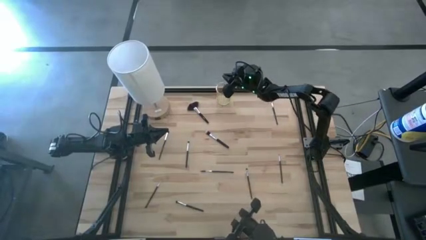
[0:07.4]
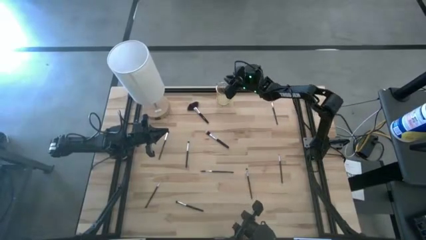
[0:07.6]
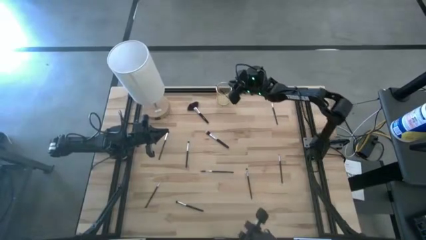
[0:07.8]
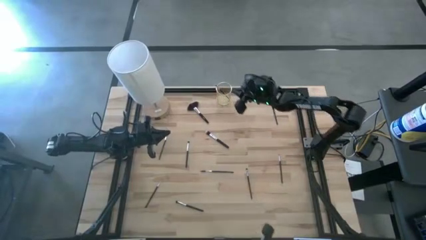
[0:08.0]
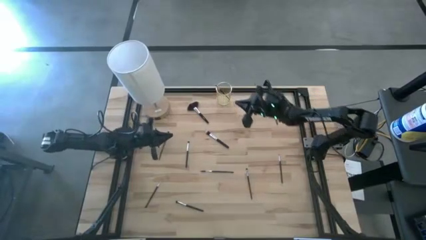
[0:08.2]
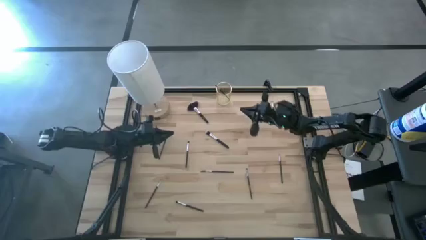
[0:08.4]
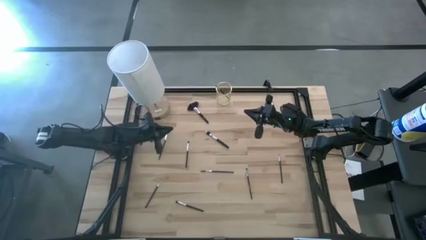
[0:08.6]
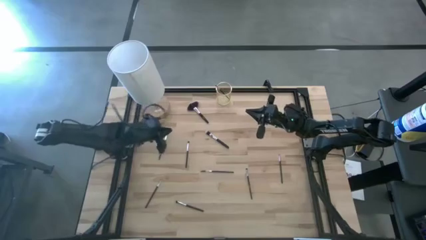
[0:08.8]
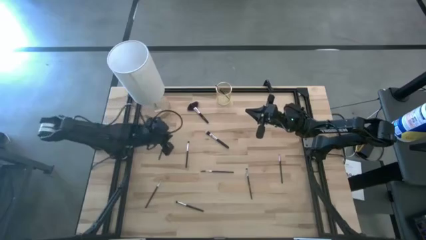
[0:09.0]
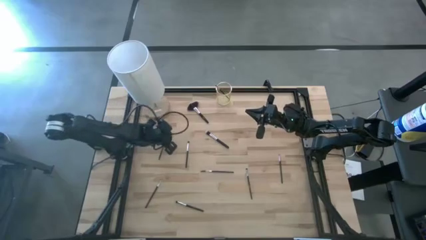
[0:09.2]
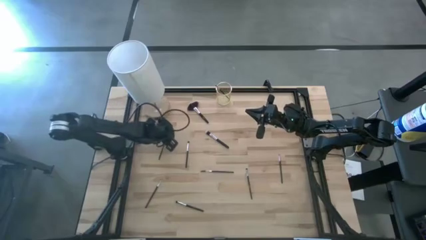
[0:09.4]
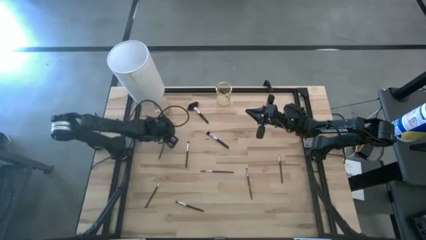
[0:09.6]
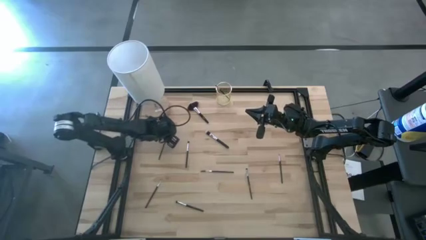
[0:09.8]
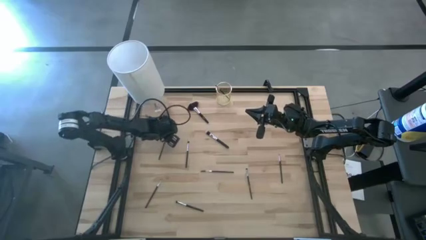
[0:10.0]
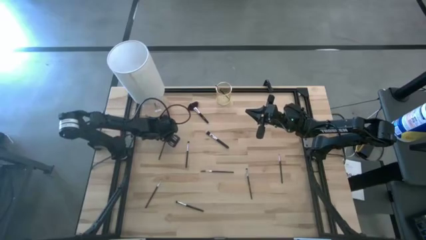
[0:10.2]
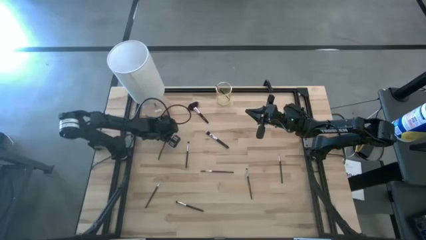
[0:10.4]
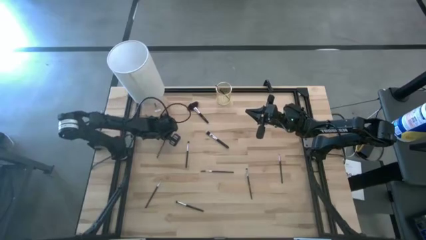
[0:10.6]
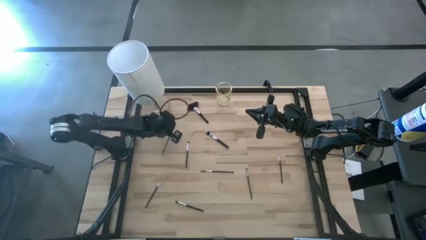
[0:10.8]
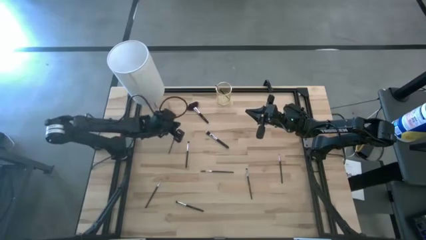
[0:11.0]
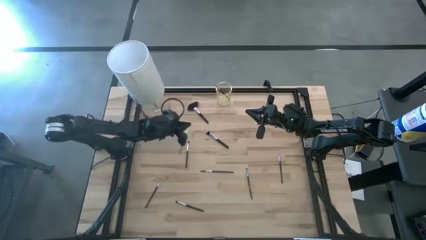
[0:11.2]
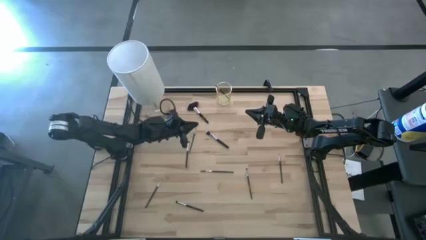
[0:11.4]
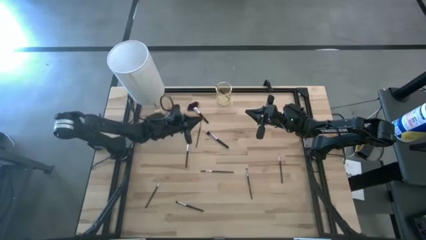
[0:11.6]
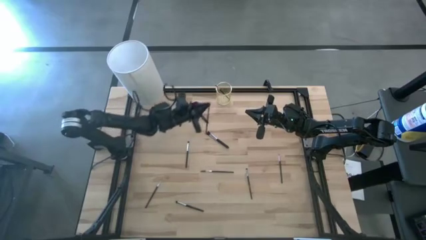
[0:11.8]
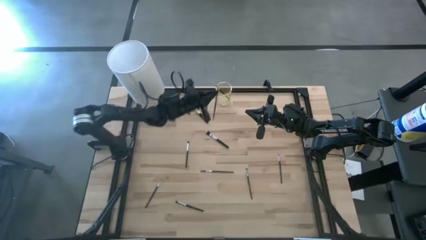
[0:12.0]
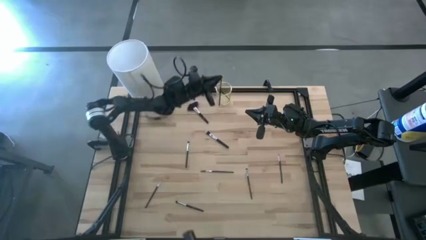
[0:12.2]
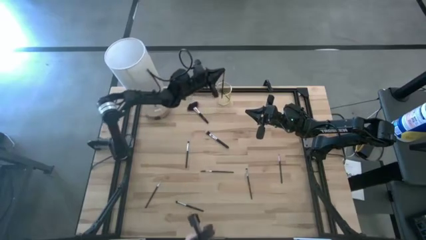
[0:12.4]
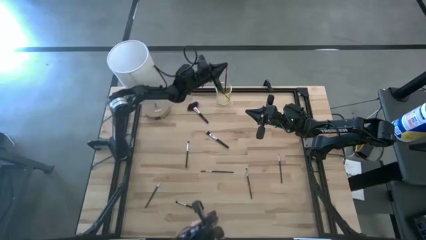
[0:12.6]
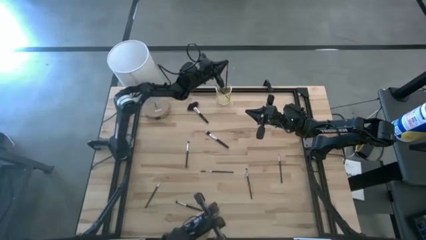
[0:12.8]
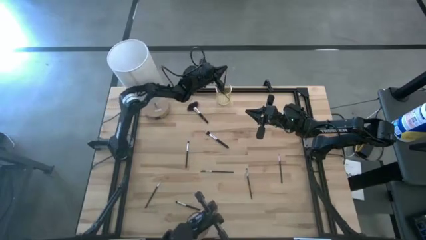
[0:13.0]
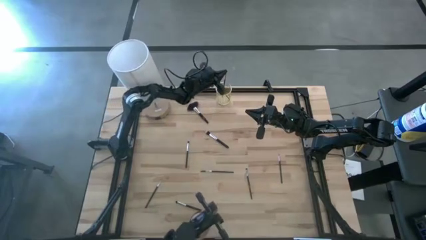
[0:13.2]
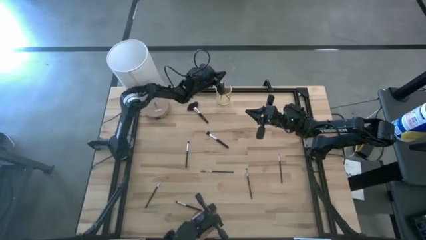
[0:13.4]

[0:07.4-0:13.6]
Task: Put items in baskets/containers
Put the eyeshadow brush into the gold container

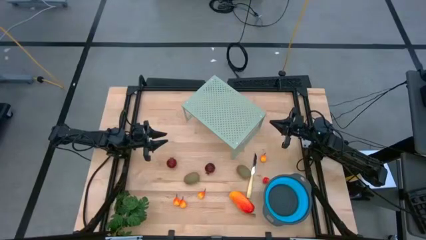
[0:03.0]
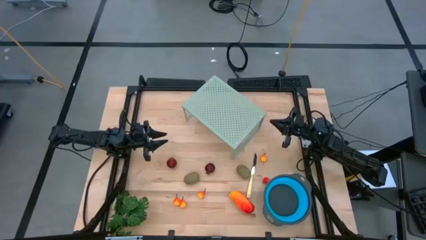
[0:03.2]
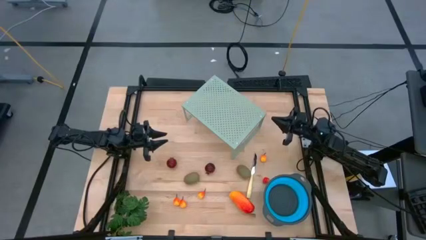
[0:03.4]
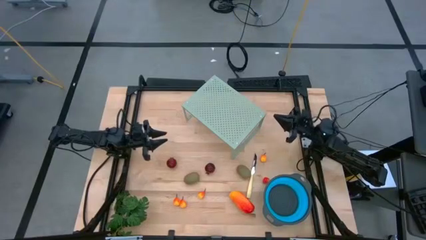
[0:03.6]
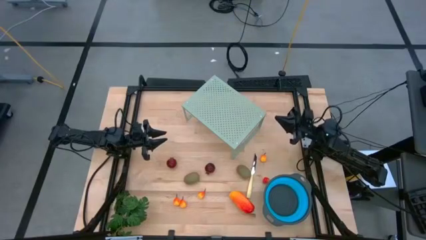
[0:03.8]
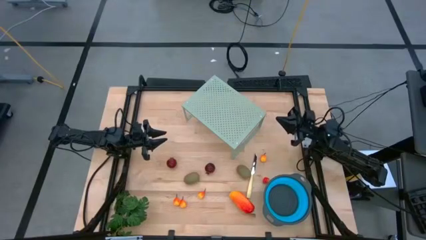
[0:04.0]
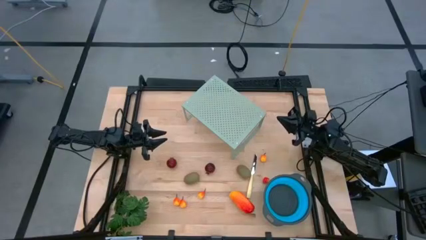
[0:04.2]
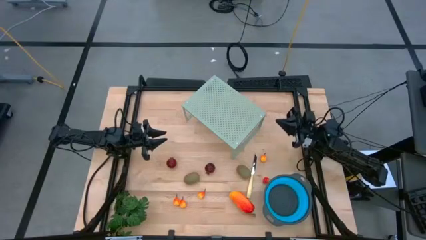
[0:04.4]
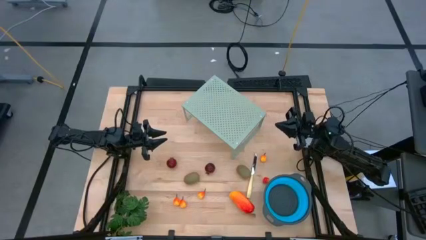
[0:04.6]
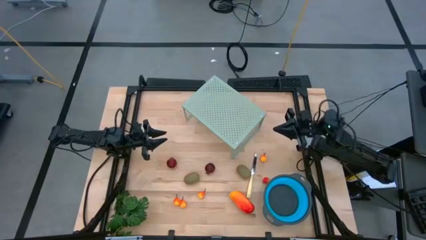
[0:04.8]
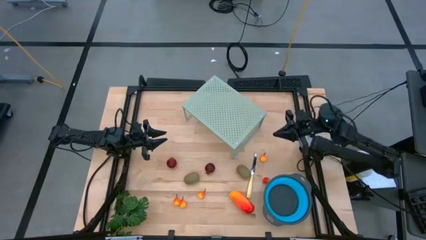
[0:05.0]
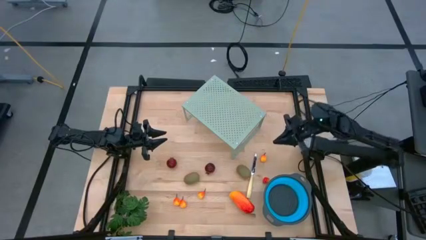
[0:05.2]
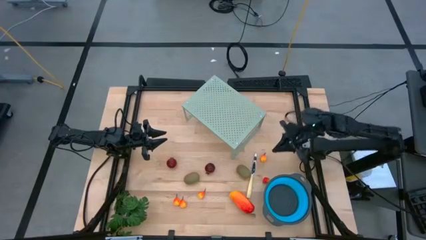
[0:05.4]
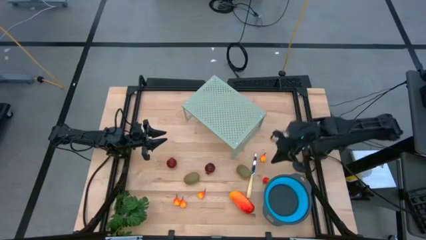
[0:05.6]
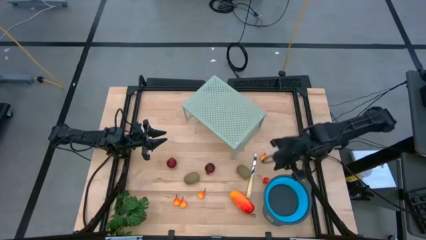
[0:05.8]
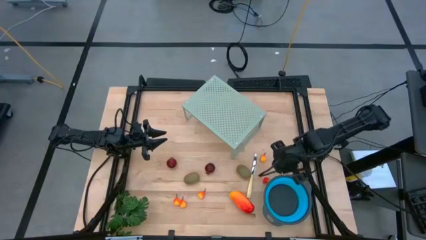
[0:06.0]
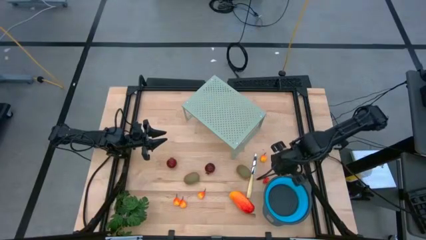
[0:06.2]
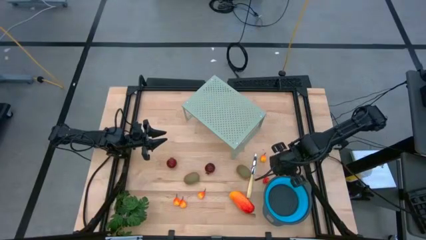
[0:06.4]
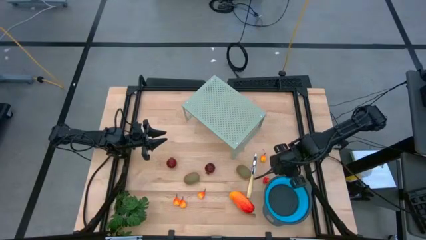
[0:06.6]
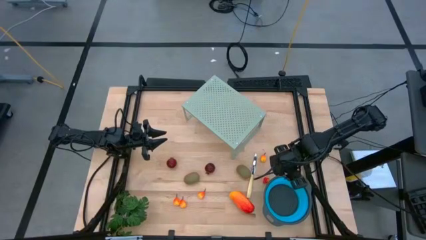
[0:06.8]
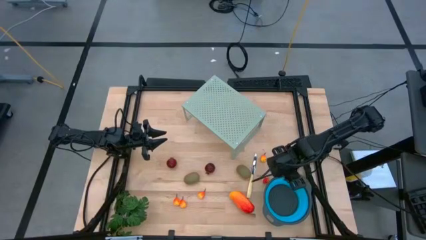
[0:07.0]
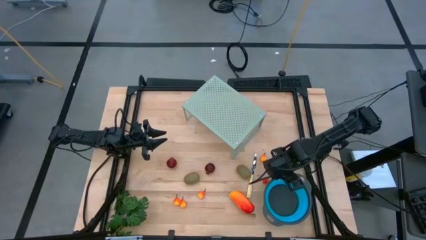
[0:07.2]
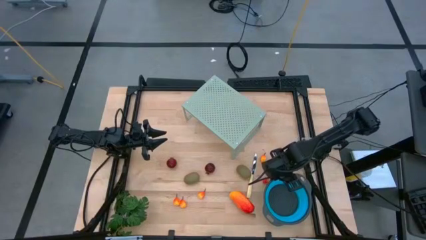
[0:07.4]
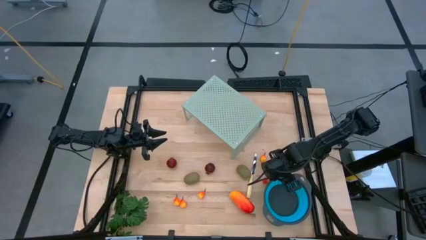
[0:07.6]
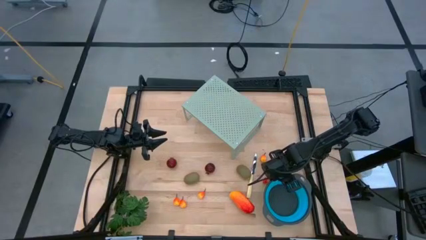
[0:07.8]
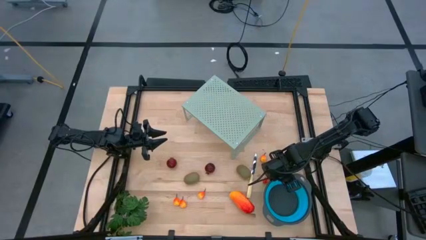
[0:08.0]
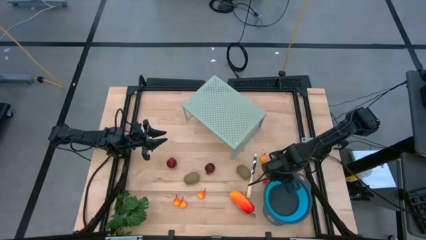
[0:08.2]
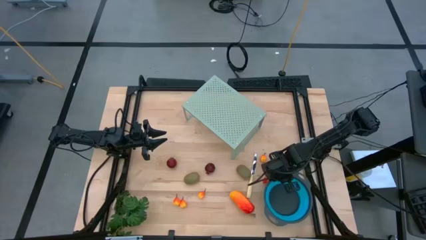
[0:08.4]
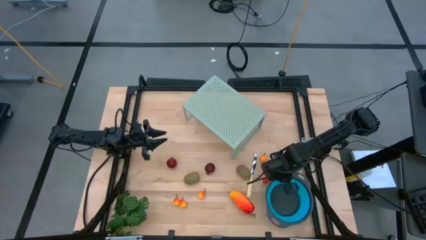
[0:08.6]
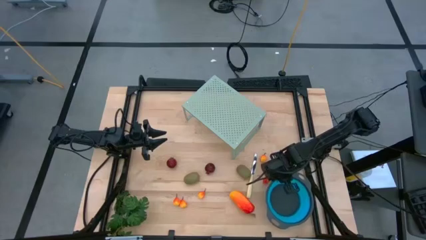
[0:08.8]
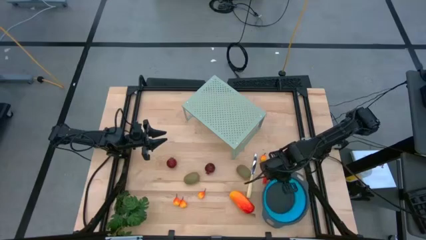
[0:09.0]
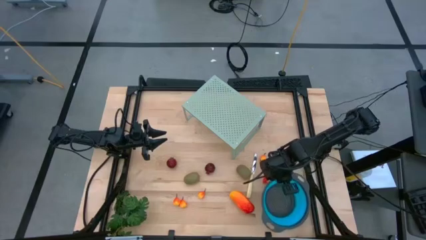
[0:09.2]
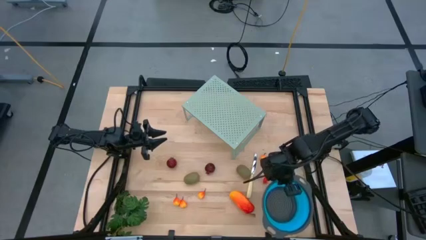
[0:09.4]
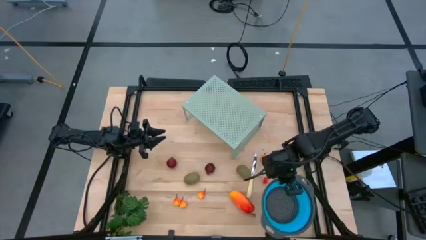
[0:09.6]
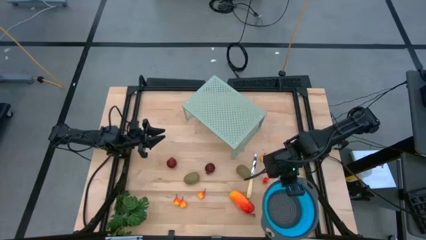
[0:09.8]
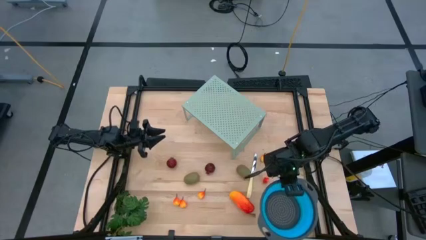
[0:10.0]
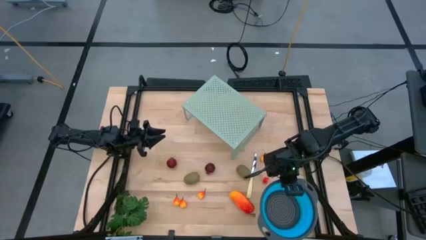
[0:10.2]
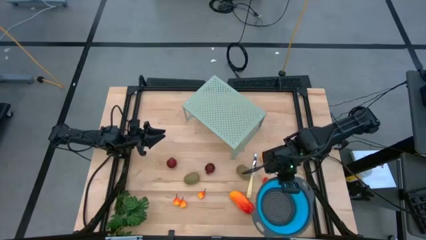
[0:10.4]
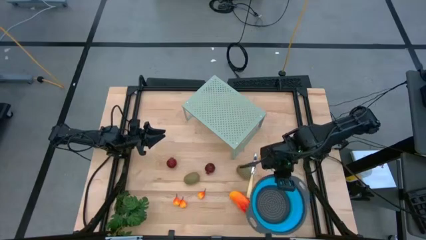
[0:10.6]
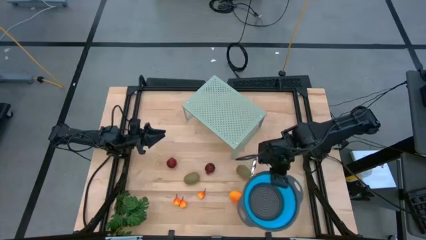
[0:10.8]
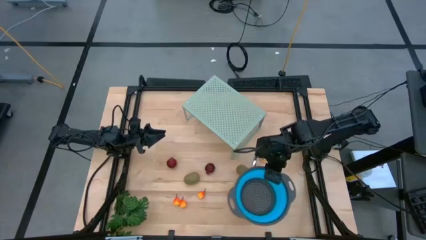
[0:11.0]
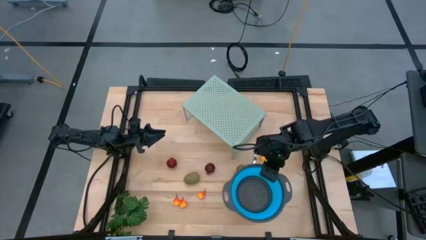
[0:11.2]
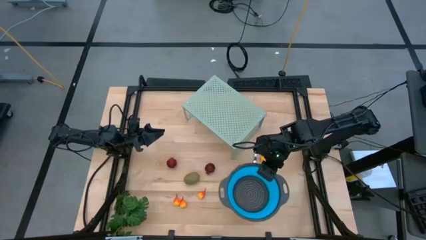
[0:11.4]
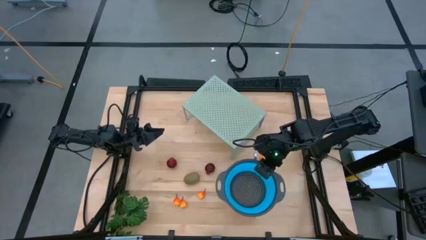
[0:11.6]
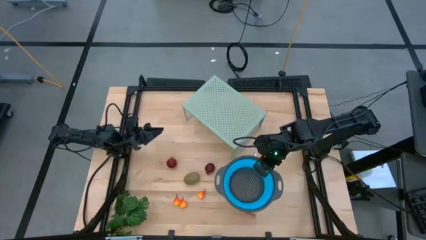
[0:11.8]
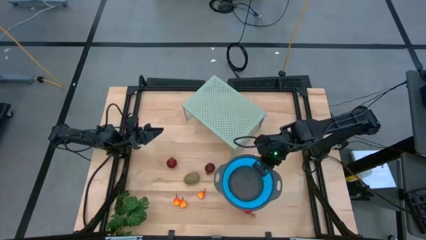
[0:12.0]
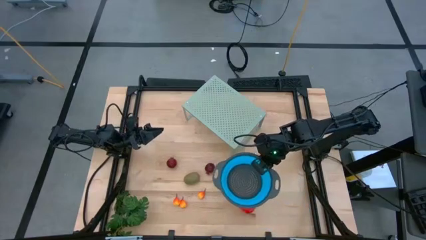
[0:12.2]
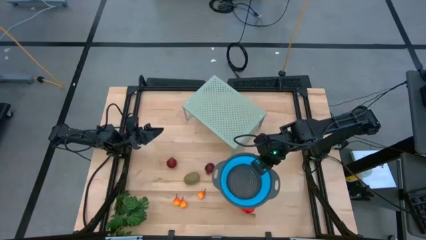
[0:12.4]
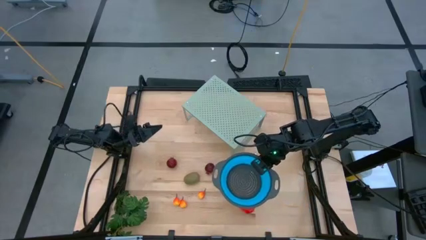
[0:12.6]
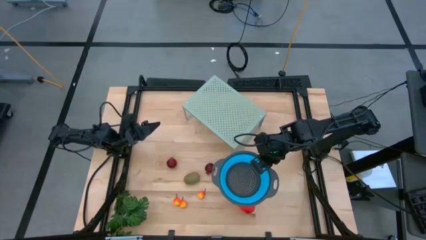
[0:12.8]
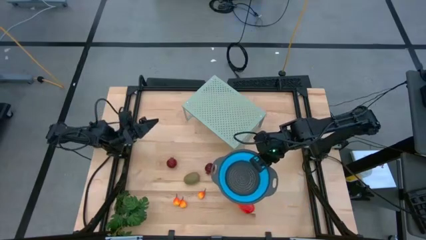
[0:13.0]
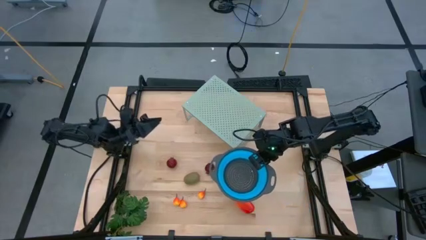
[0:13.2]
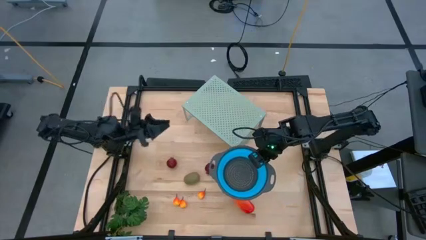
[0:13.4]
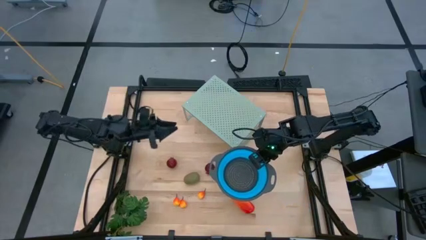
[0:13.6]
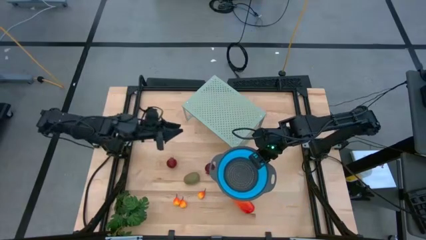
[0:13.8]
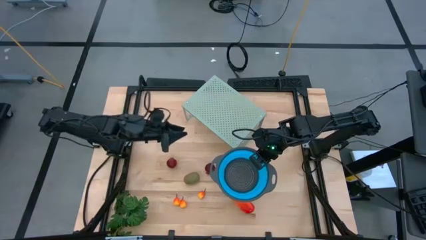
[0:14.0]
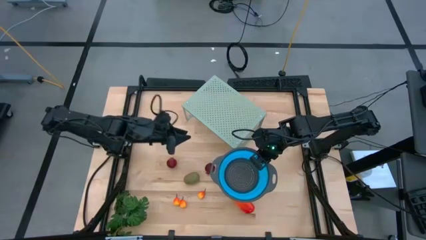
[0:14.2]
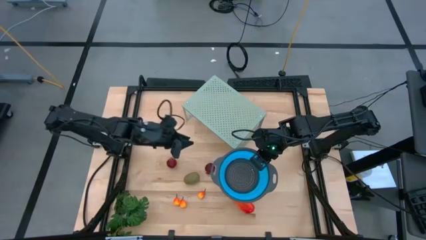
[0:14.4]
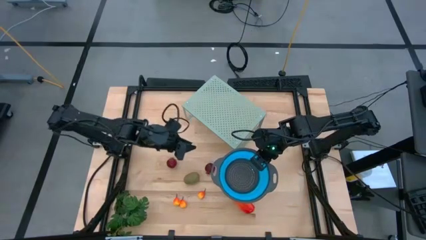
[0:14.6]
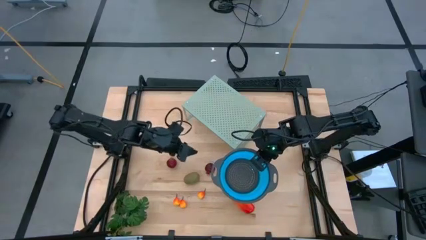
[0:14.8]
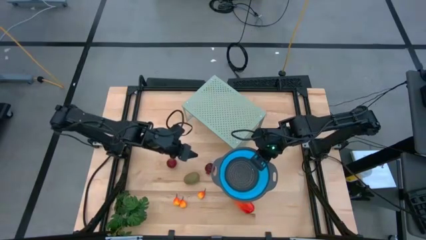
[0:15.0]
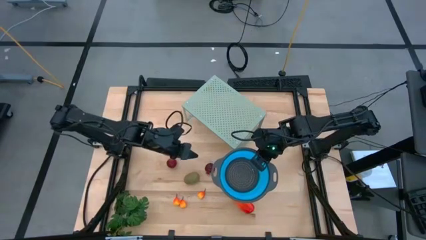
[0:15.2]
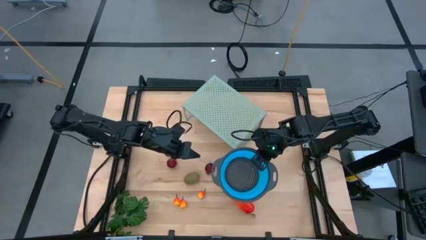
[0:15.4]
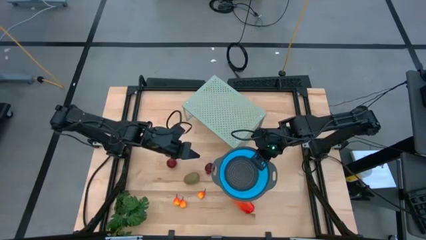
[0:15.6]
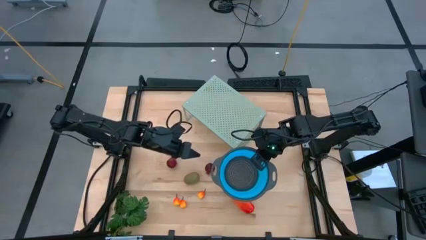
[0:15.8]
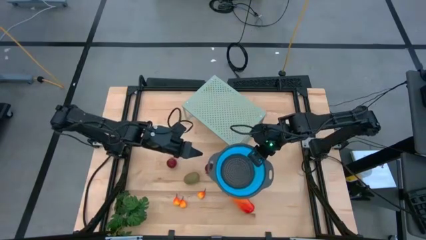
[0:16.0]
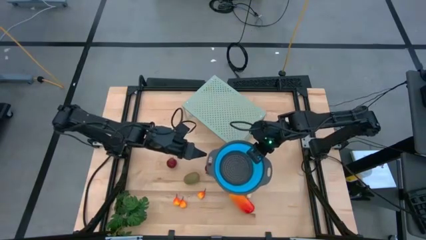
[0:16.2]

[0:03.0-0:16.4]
Task: Pick & Place Fruit
Put the blue strainer bowl on the shelf
